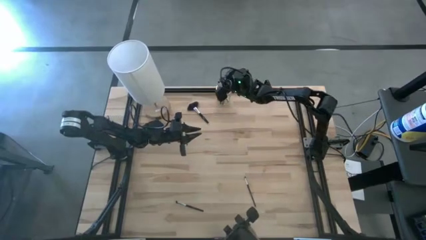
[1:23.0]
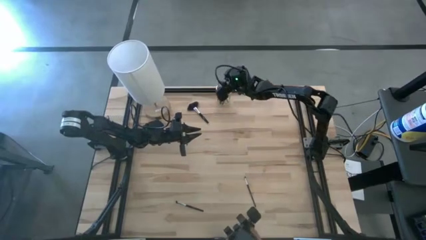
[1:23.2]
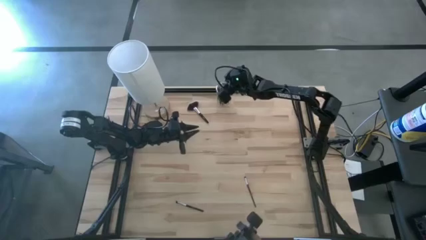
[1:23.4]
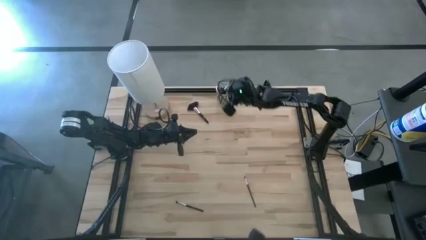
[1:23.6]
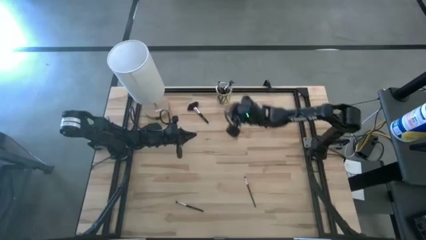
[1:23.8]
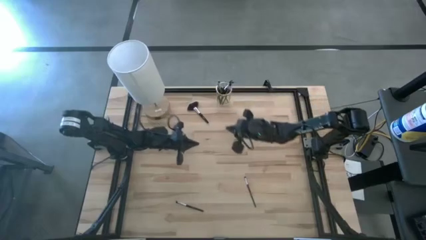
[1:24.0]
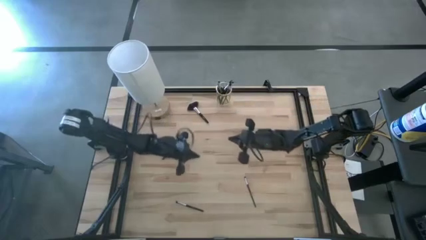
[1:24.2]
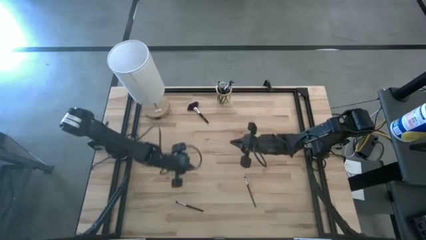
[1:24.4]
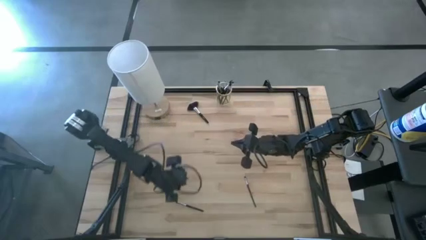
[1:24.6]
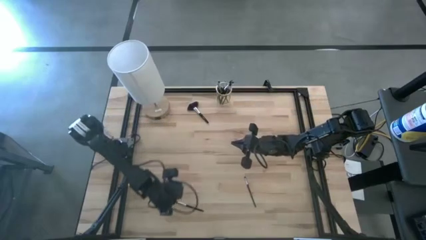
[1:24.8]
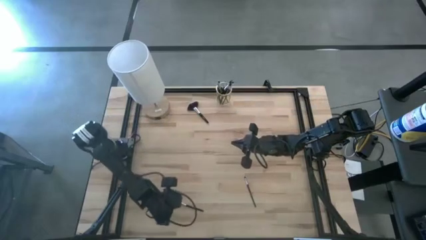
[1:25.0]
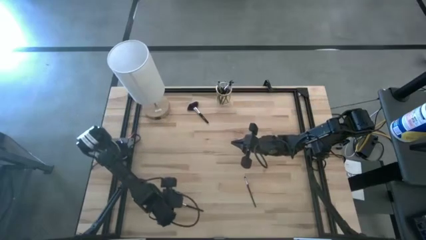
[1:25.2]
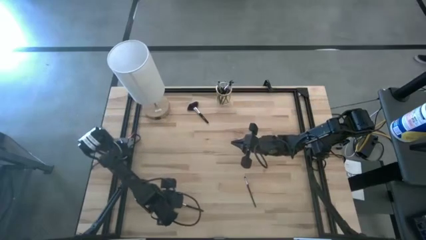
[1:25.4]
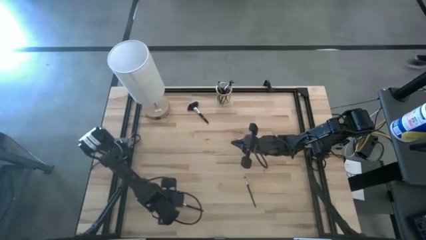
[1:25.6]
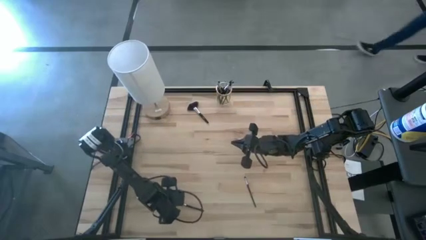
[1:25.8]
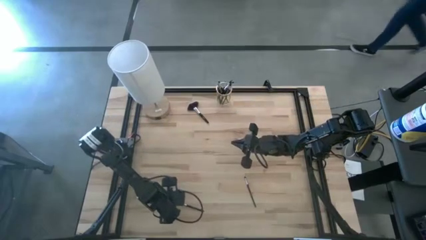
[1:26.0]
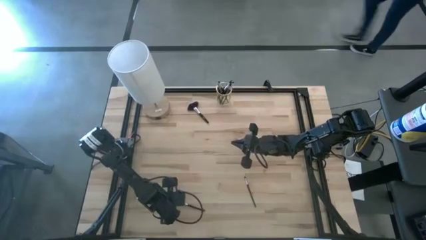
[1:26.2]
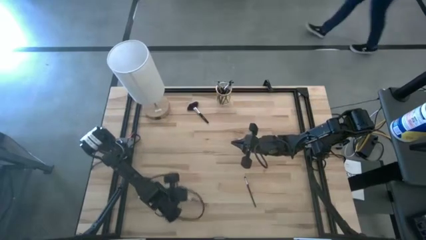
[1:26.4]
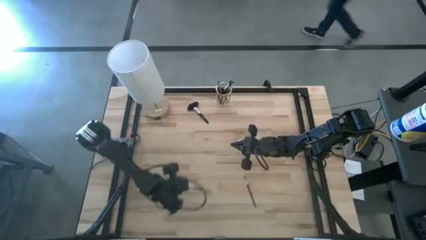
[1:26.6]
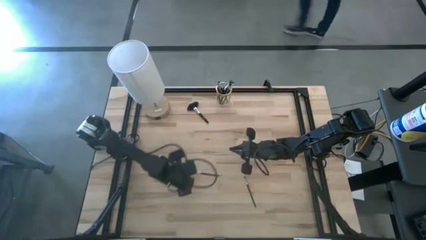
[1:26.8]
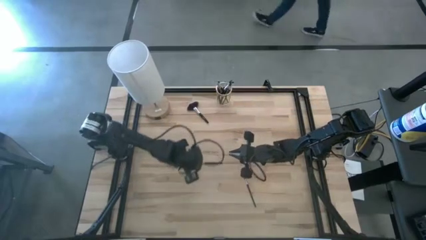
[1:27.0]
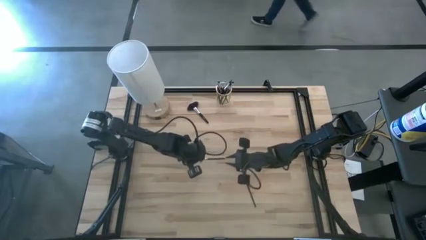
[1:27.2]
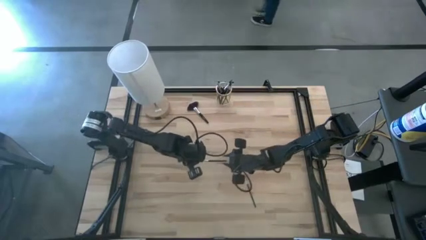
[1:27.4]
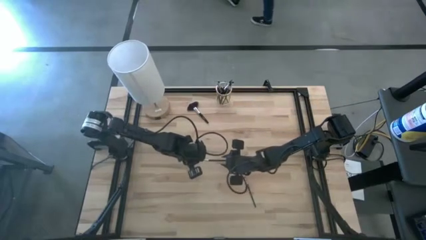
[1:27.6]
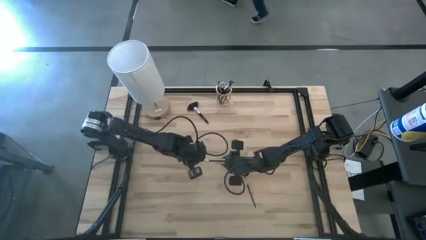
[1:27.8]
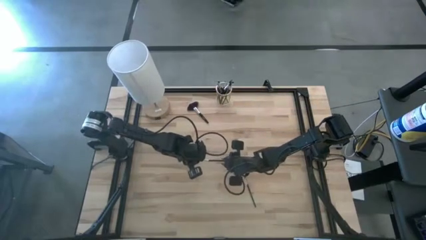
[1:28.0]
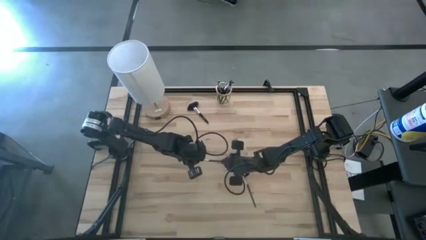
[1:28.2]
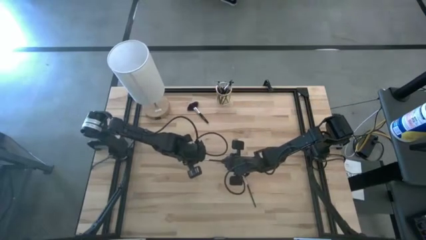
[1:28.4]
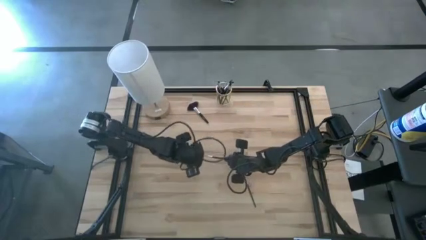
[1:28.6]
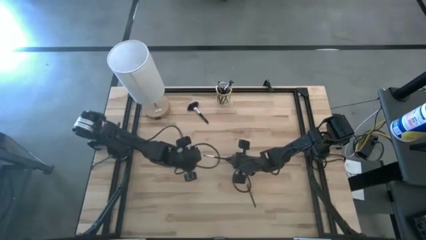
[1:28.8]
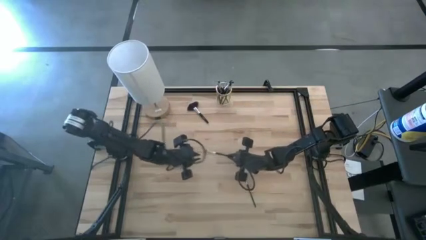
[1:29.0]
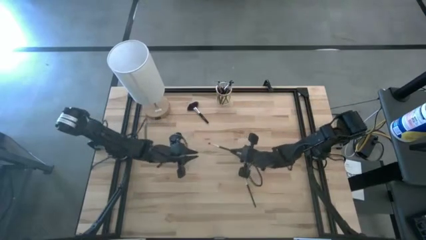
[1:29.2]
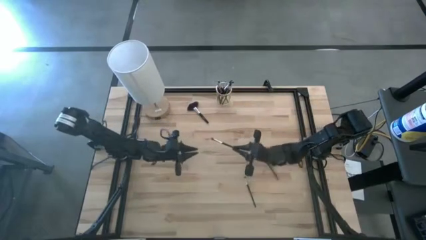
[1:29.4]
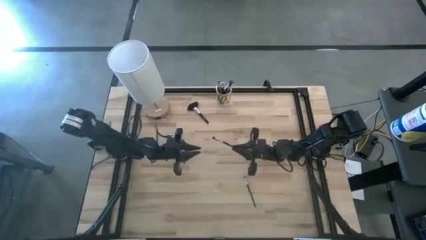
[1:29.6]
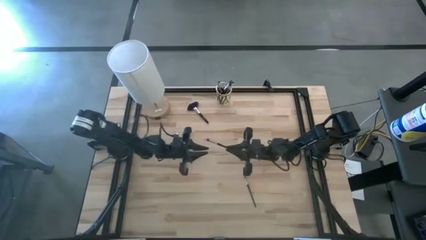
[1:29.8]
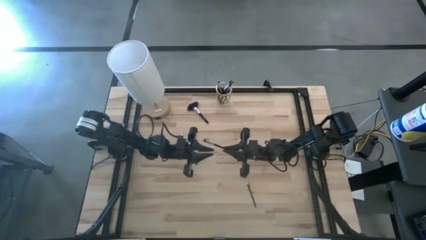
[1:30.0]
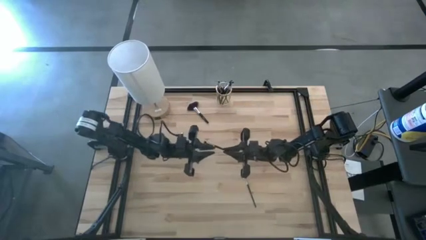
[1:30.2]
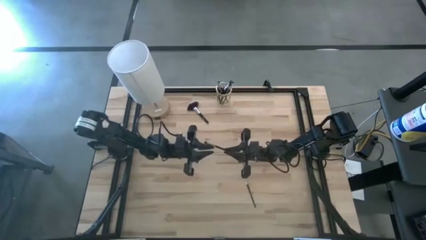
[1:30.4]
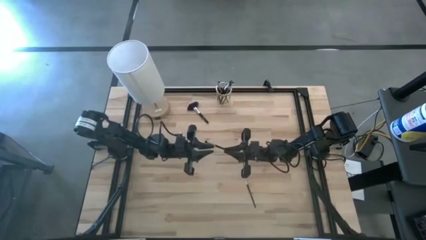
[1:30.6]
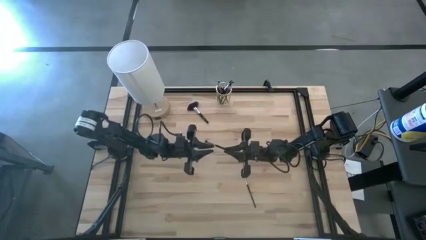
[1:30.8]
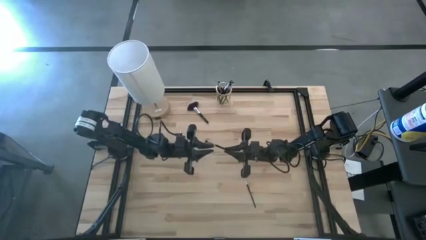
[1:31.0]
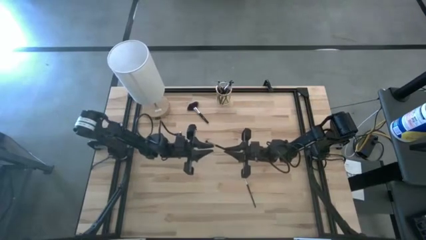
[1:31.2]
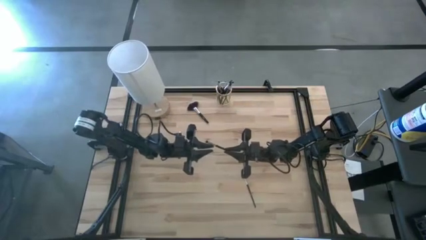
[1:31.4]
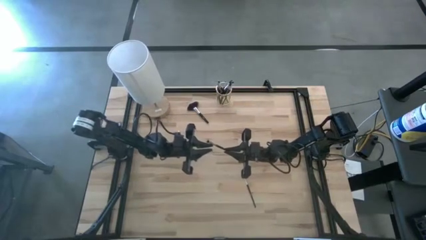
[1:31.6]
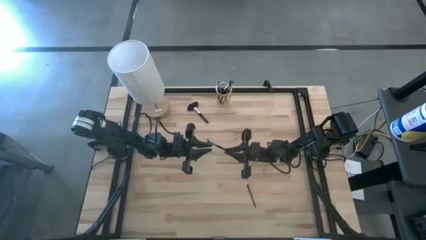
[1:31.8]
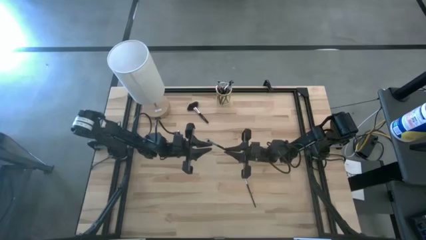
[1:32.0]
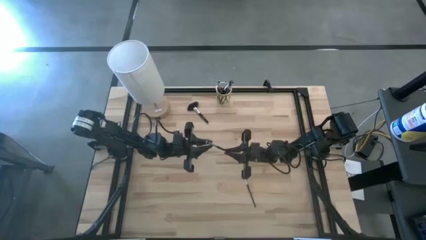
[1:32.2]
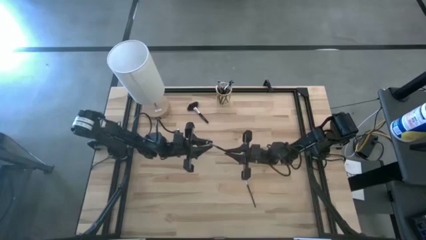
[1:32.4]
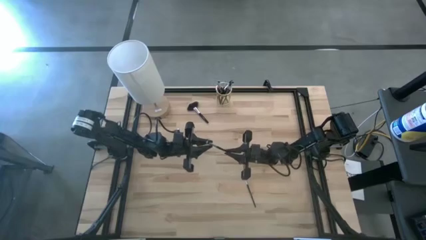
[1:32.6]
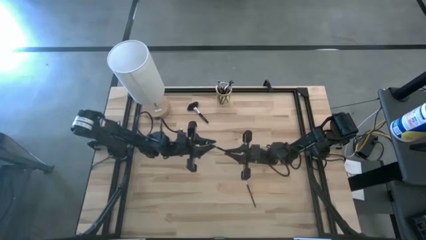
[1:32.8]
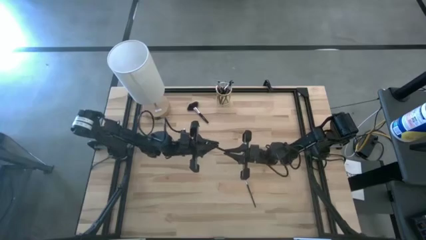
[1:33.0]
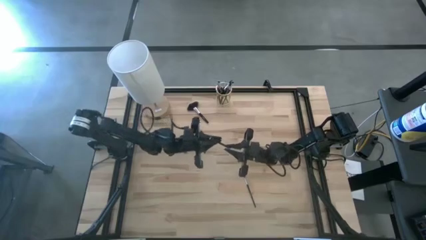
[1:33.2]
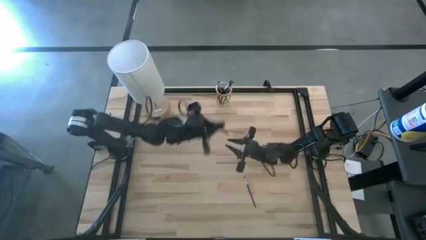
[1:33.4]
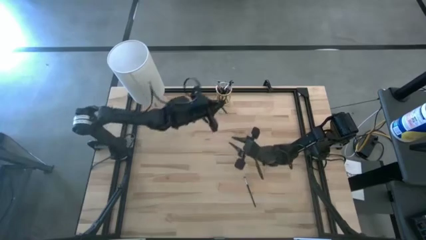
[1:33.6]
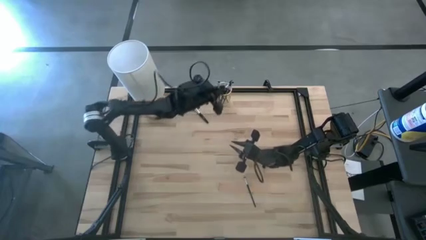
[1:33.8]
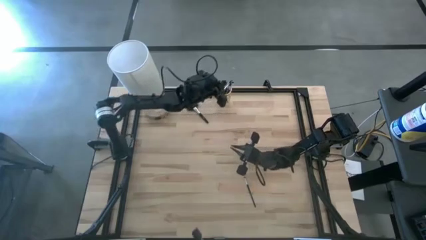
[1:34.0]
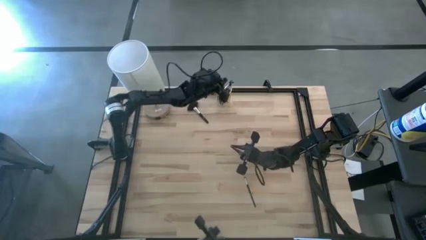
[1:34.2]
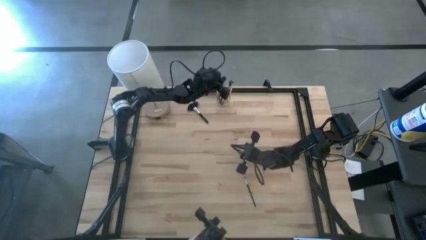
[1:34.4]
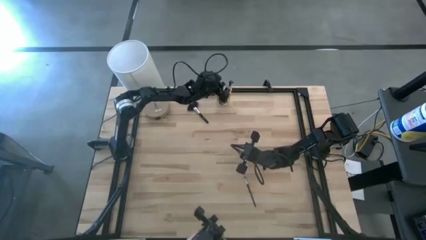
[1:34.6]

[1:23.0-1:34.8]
Task: Put items in baskets/containers
Put the powder brush into the gold container

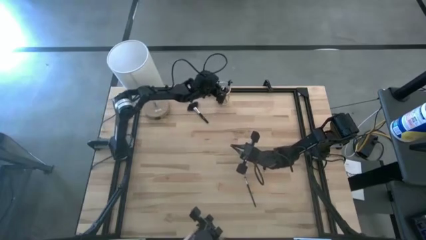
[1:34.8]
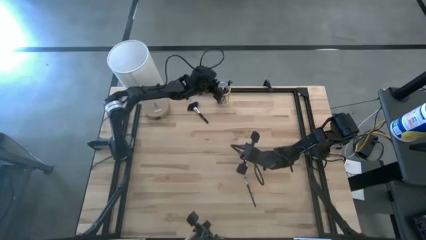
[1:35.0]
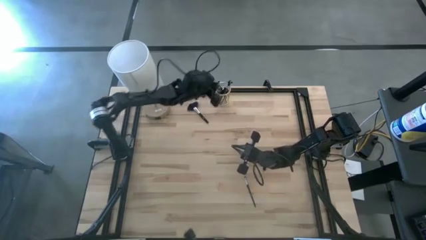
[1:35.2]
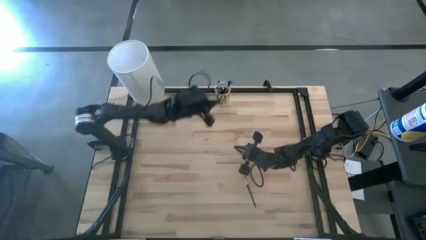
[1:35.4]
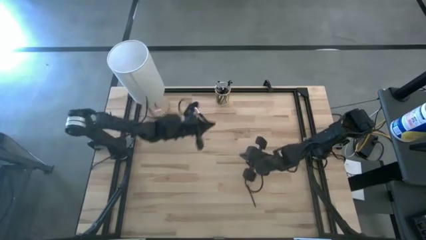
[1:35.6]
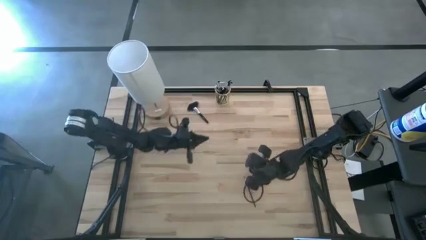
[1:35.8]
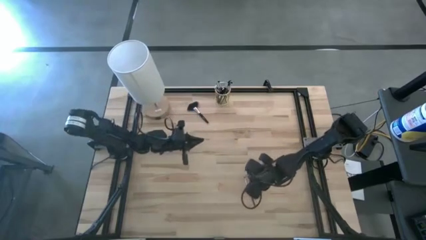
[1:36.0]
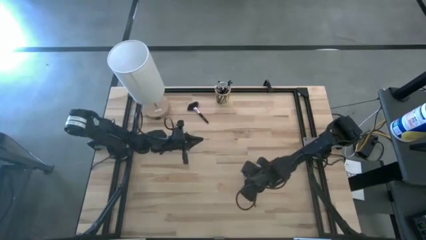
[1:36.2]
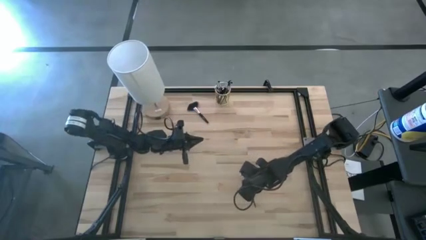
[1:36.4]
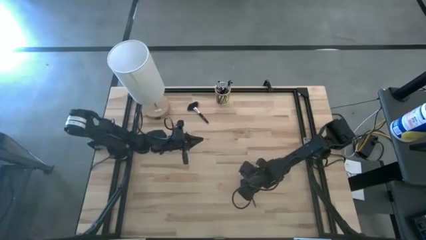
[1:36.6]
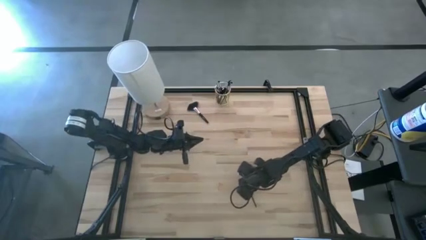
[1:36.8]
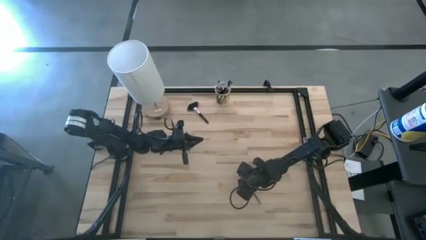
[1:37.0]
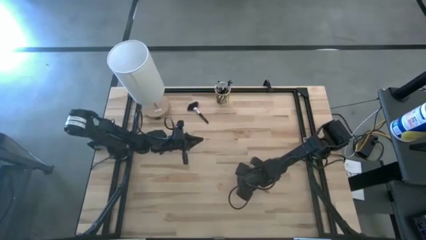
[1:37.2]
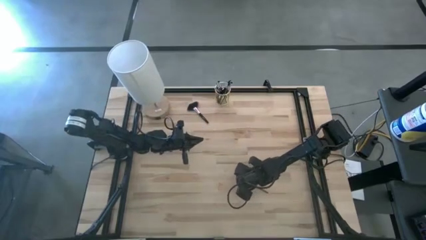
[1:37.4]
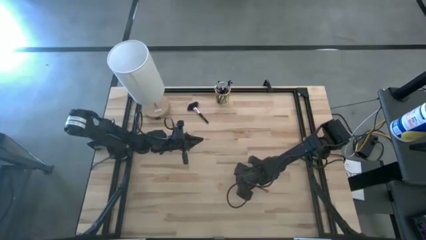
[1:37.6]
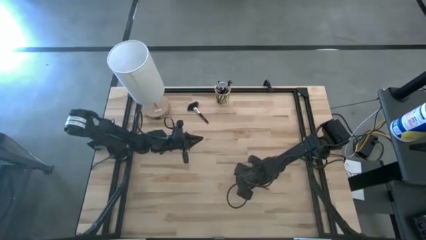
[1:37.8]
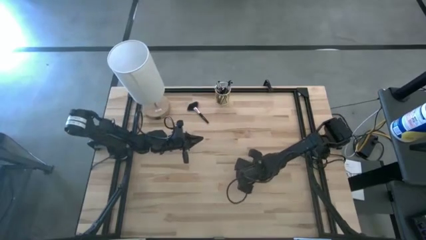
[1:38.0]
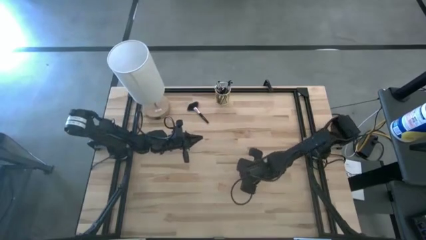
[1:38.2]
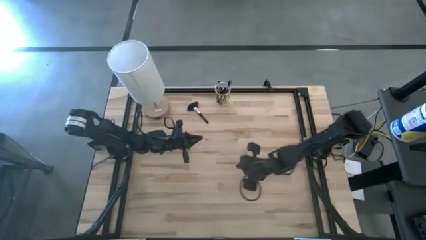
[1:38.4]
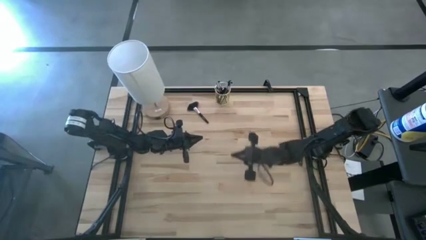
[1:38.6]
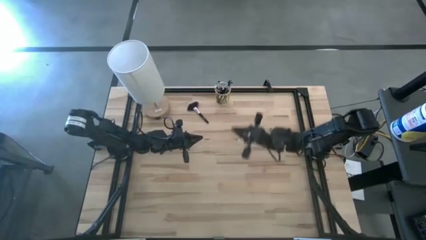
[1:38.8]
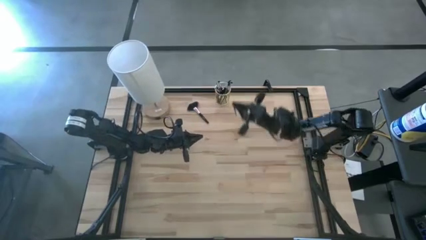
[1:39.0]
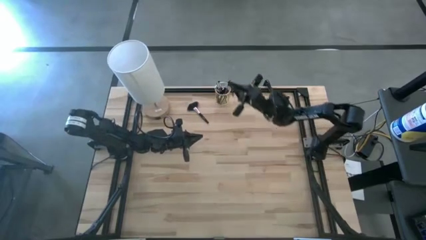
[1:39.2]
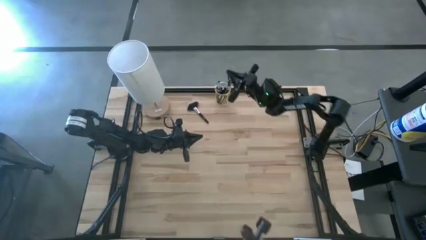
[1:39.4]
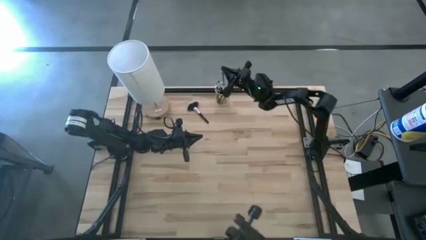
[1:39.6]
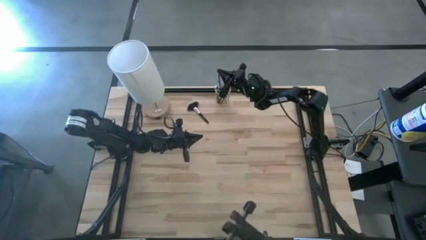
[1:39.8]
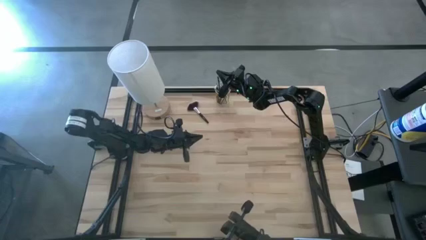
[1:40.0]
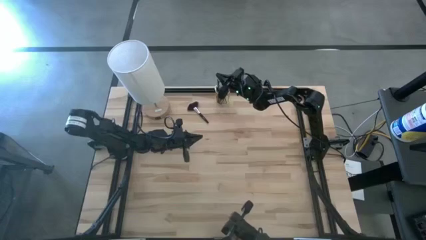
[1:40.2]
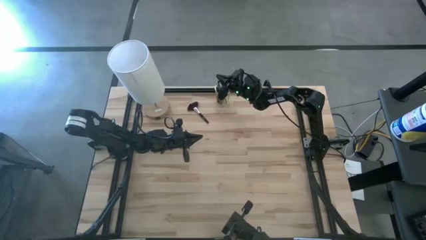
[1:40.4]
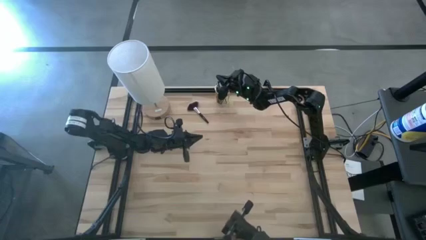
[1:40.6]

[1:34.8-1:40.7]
Put the eyeshadow brush into the gold container
